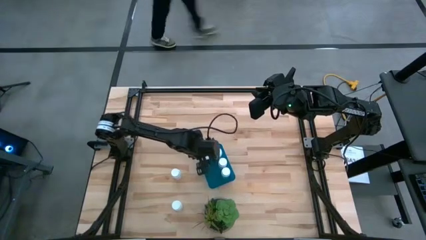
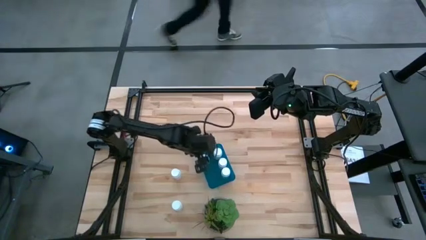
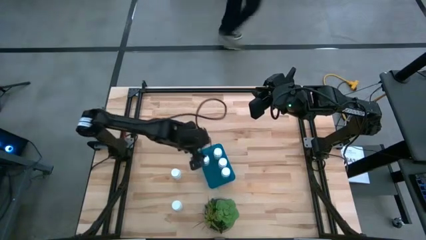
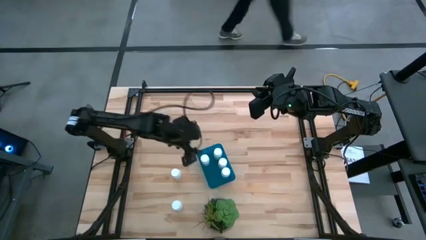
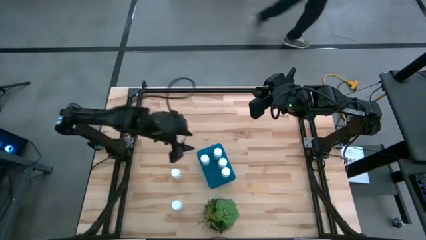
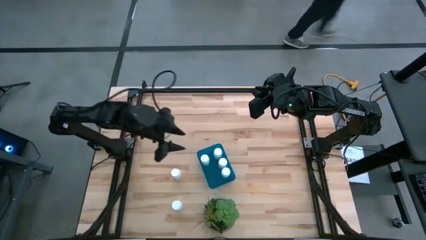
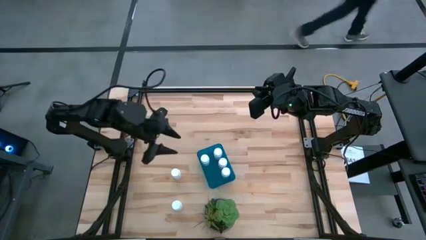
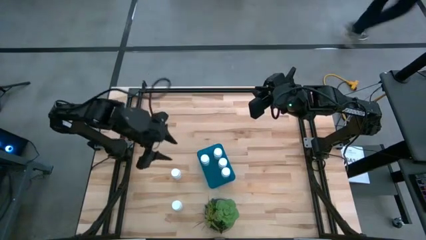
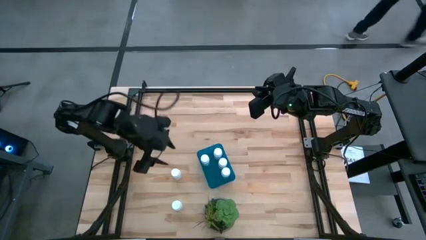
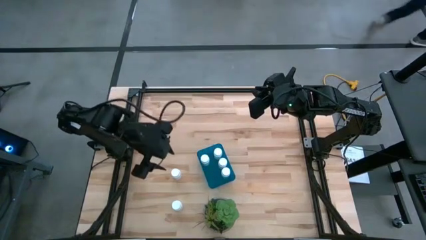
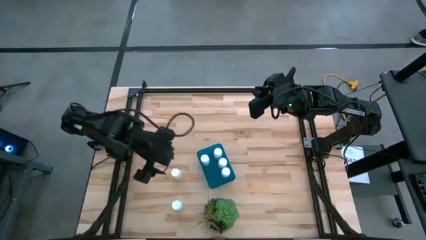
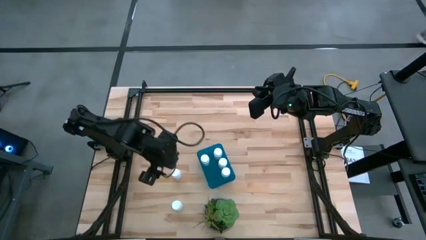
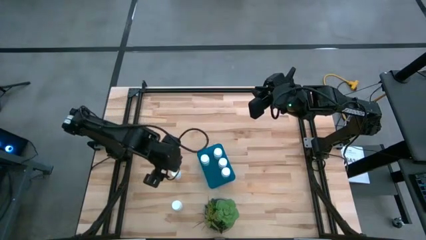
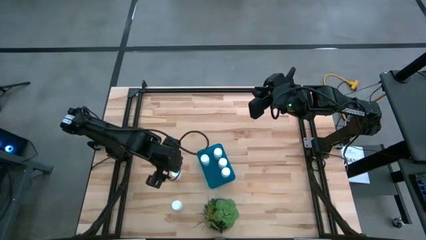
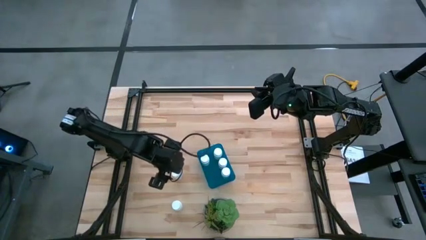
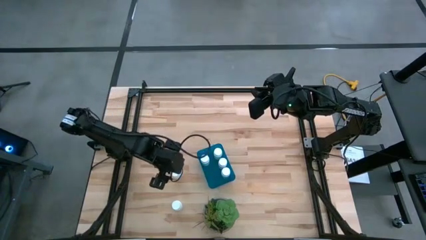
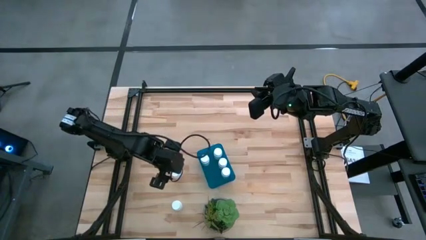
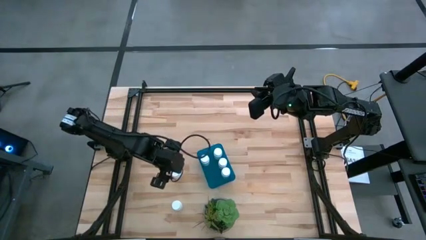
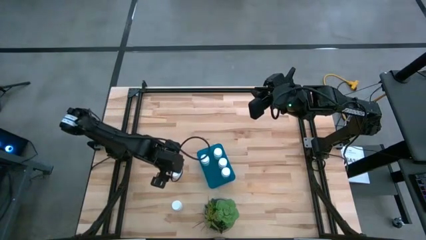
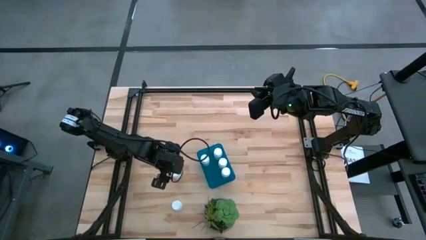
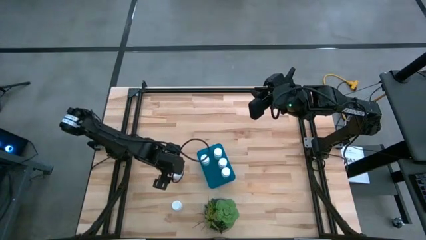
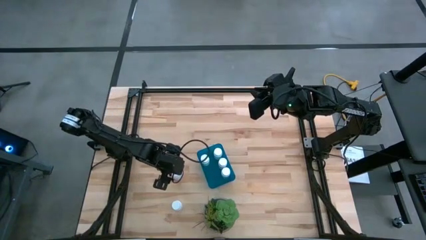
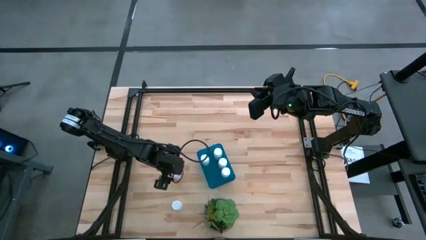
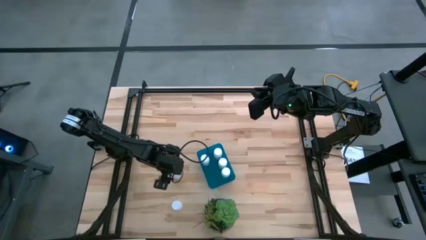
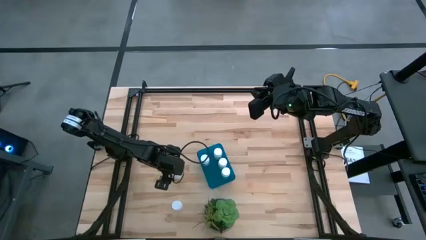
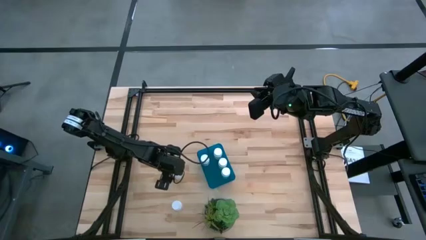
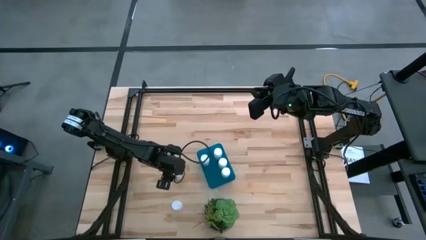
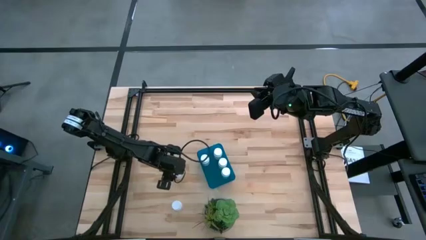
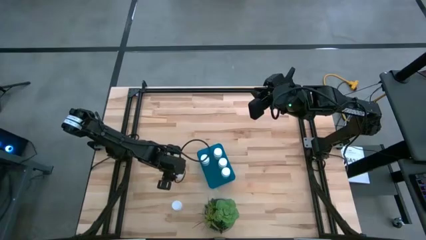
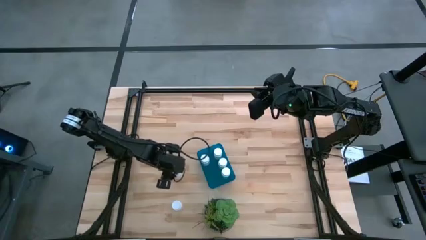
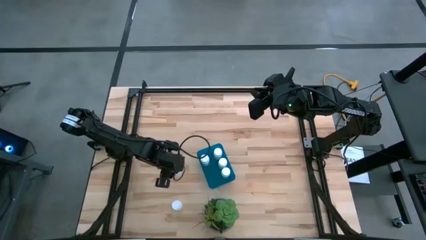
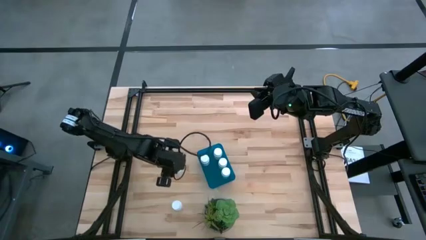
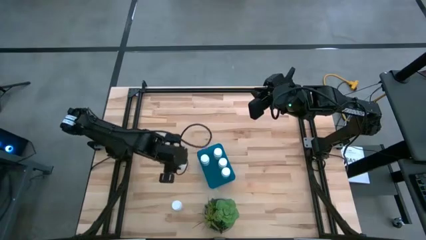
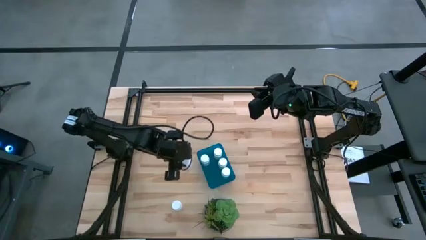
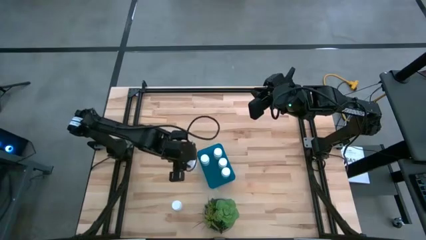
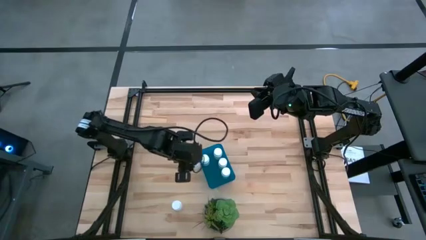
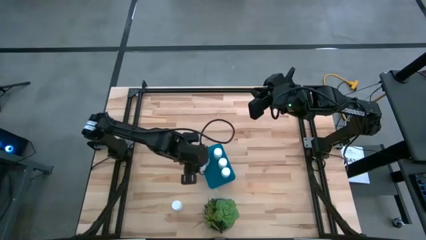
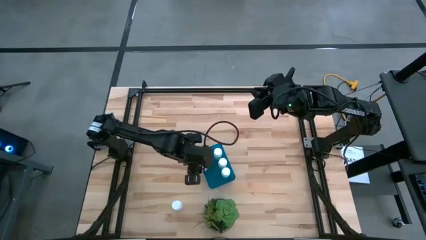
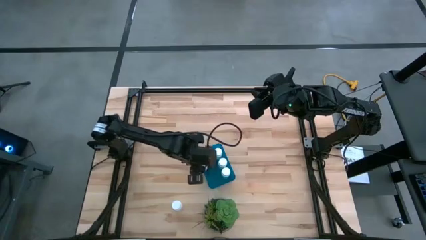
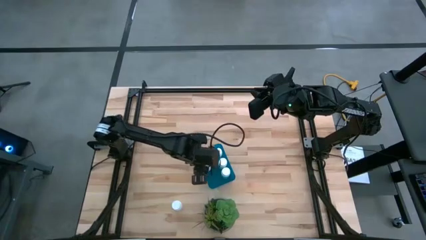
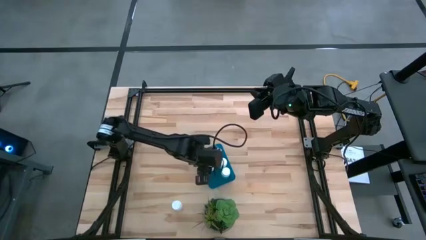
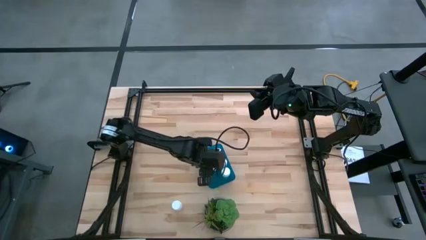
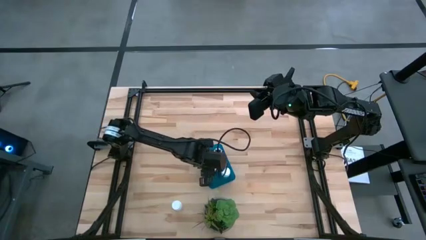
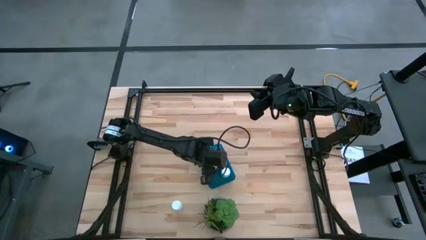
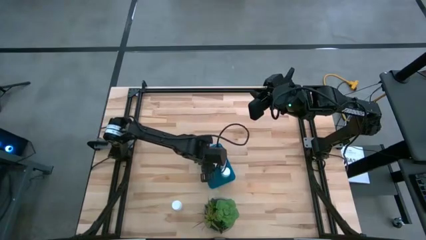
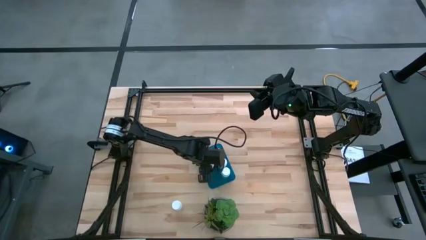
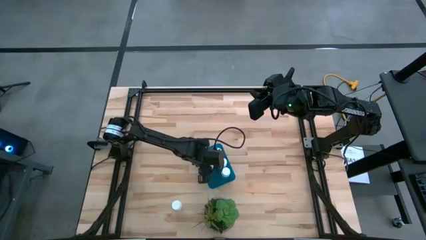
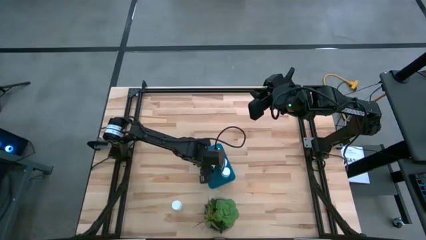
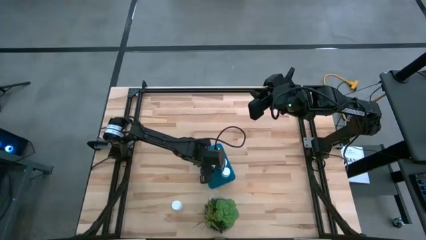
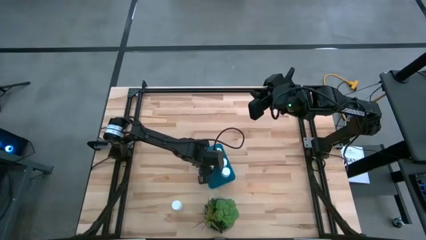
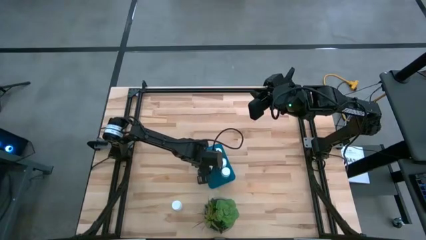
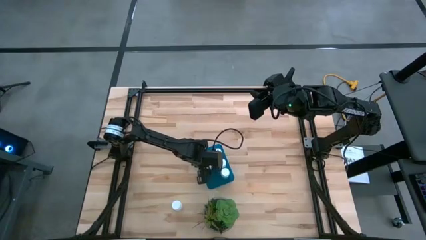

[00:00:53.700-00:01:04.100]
Task: Pick and place pill bottles into a basket
Put the medicine bottle into the container

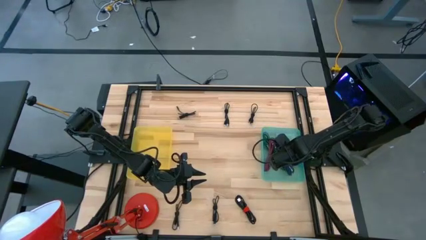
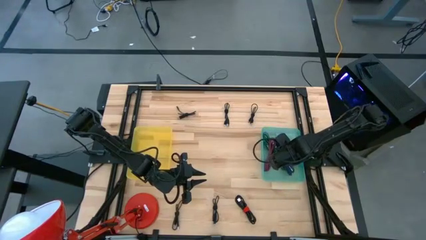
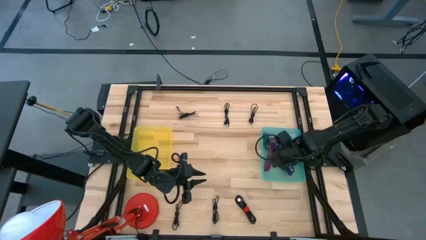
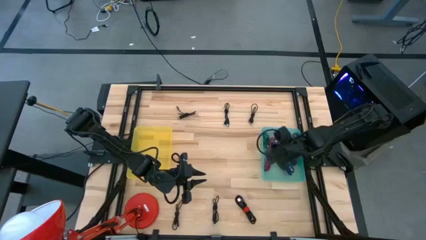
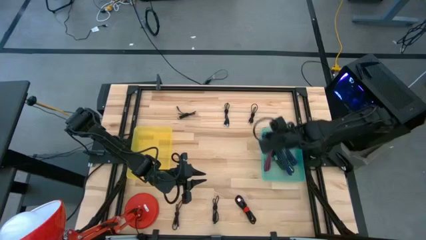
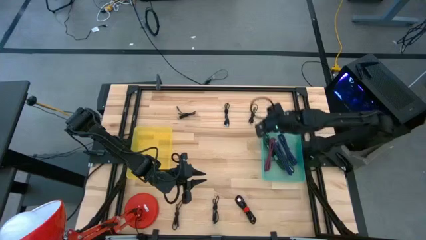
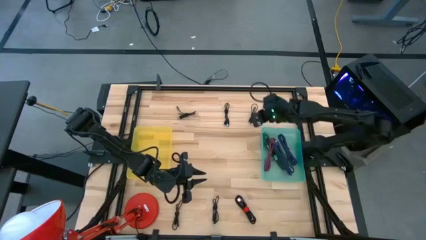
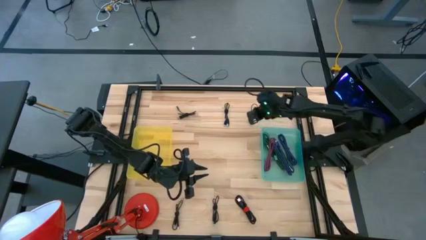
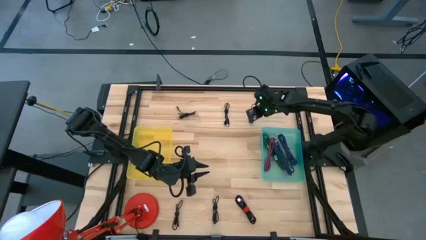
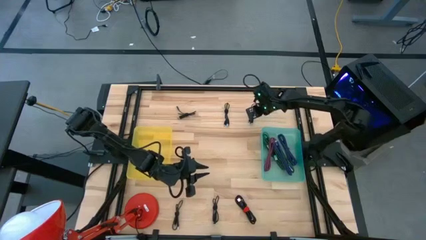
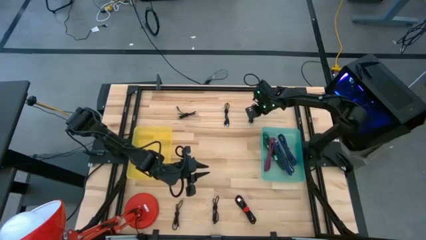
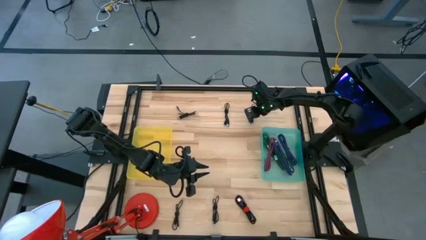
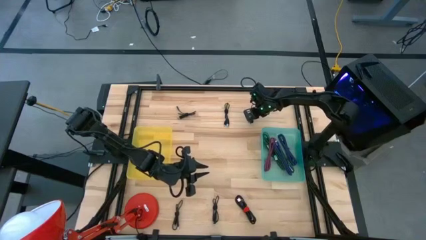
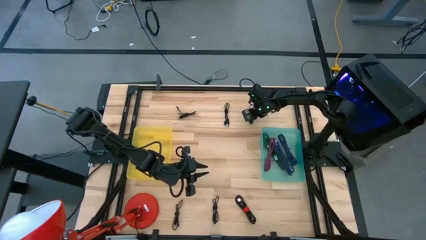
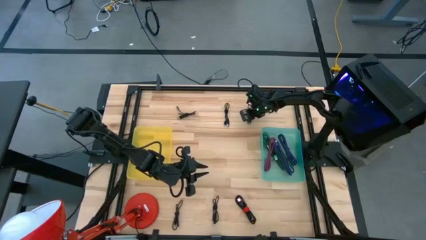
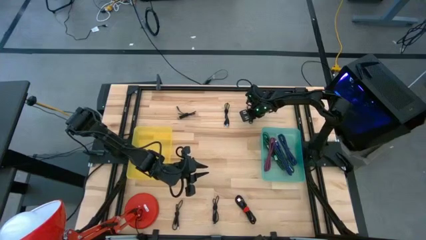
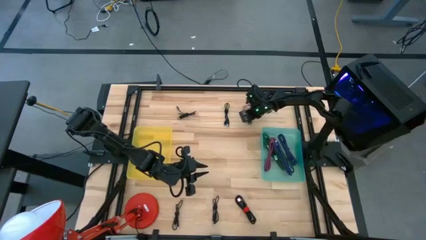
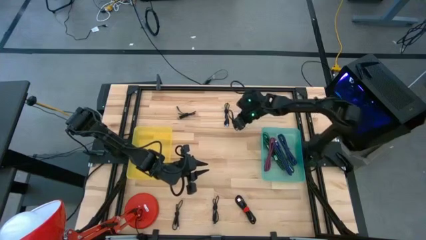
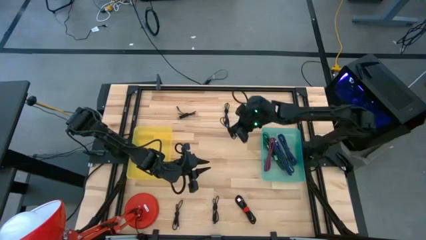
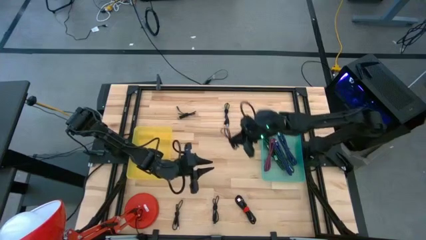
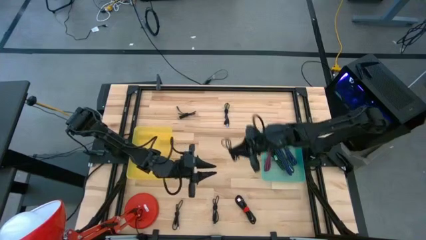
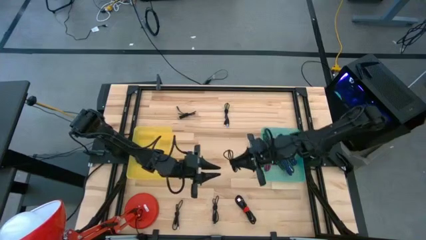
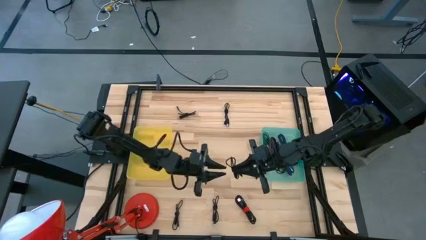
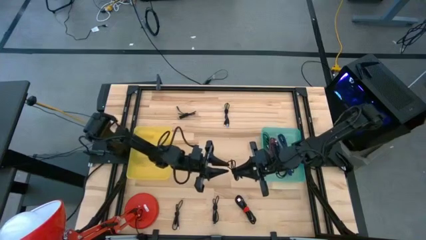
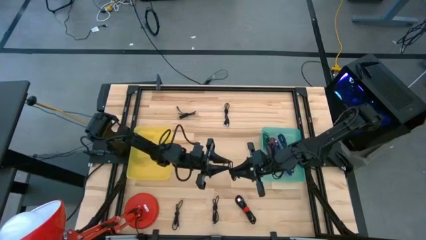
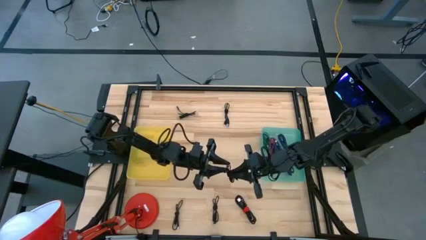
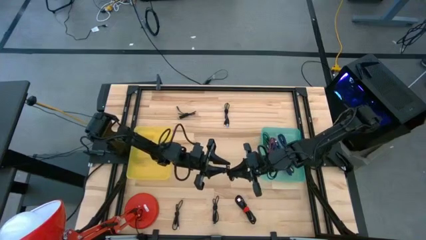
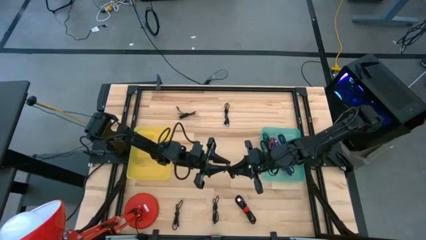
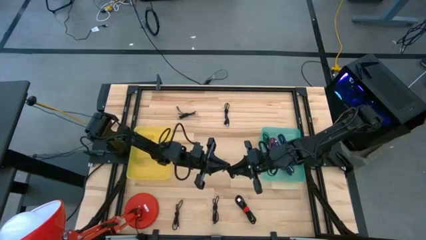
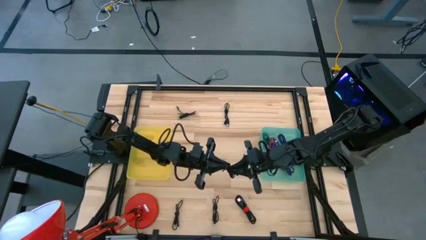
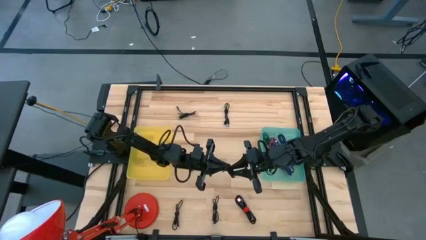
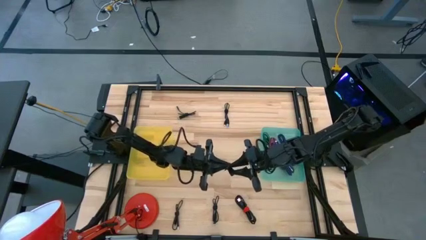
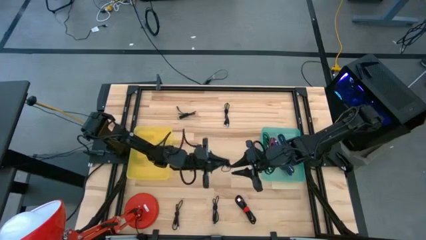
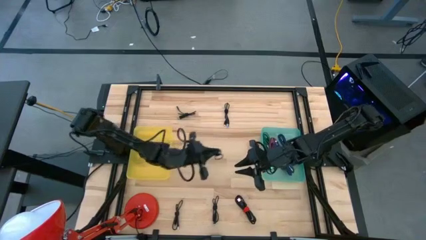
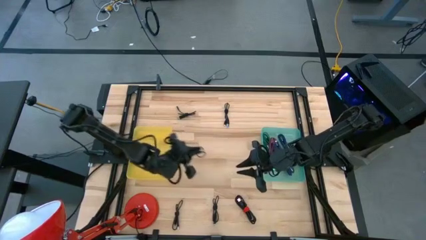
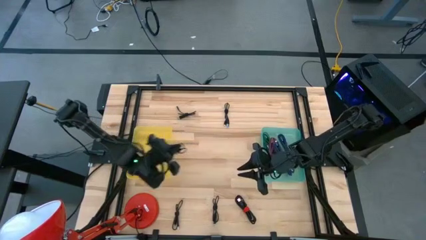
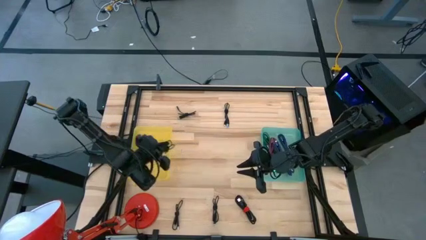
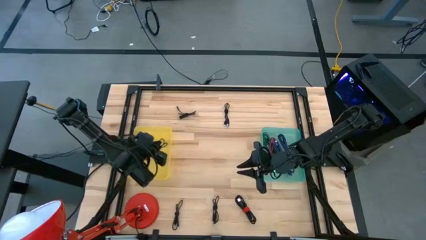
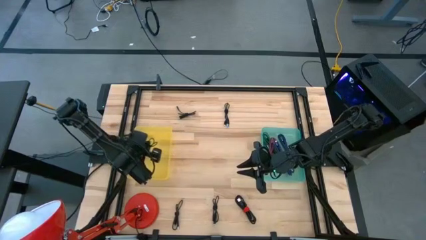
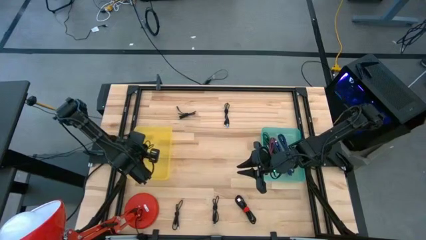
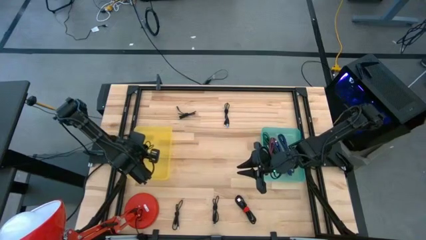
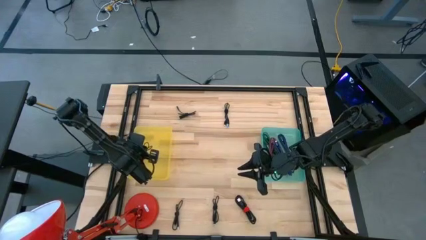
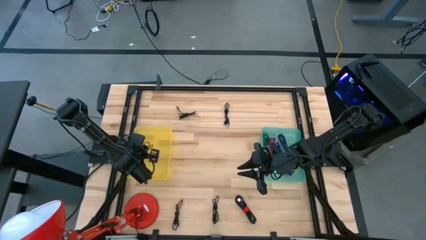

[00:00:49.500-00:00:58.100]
Task: Pick & Place USB Port
Put the black charger cable into the yellow bin
